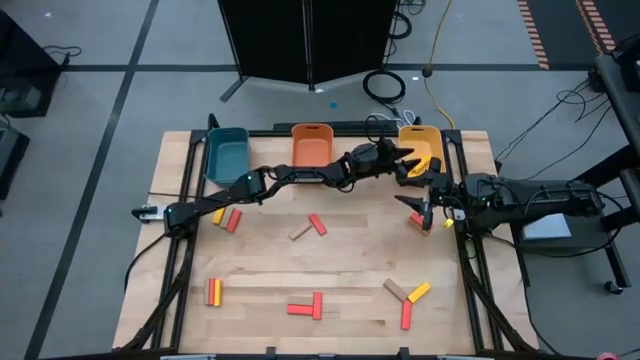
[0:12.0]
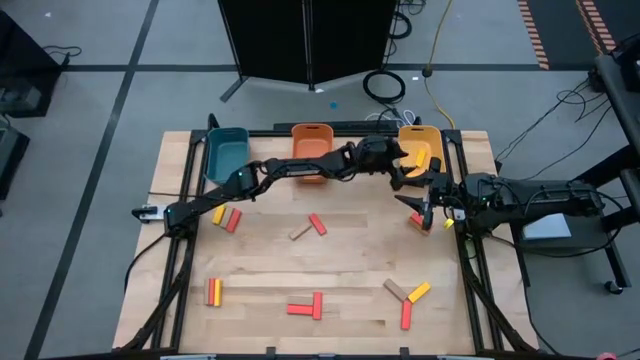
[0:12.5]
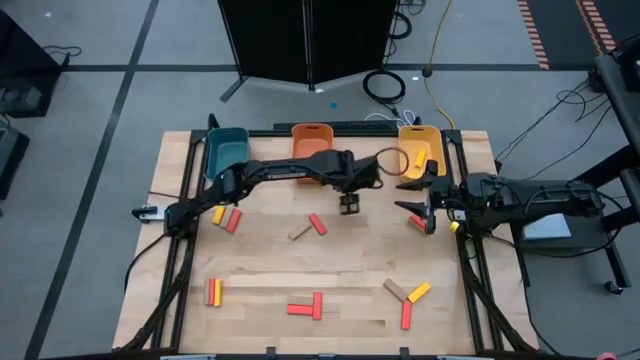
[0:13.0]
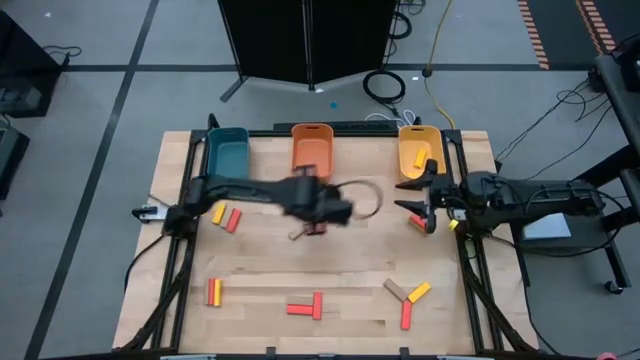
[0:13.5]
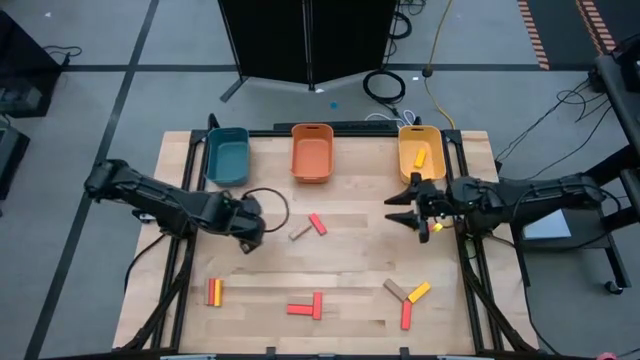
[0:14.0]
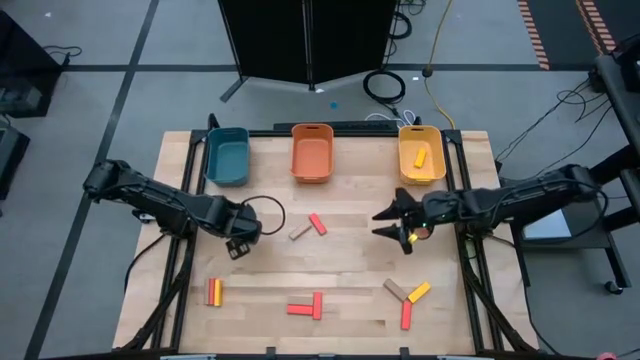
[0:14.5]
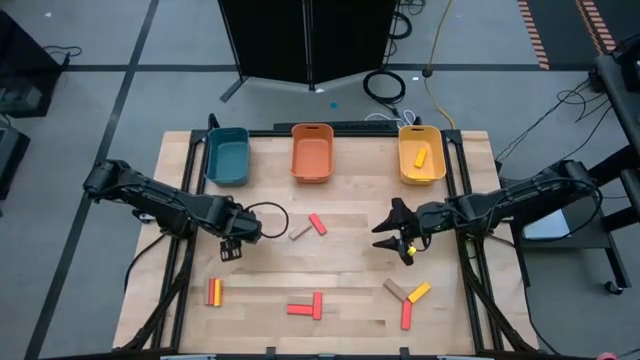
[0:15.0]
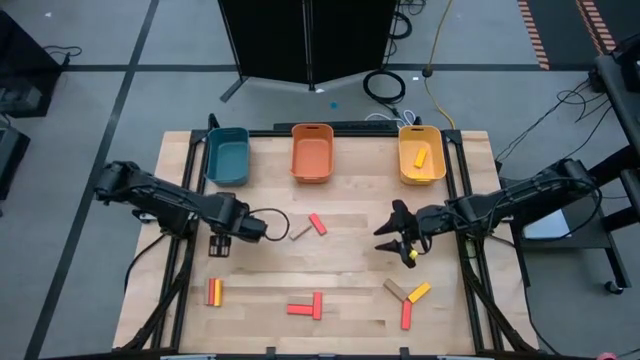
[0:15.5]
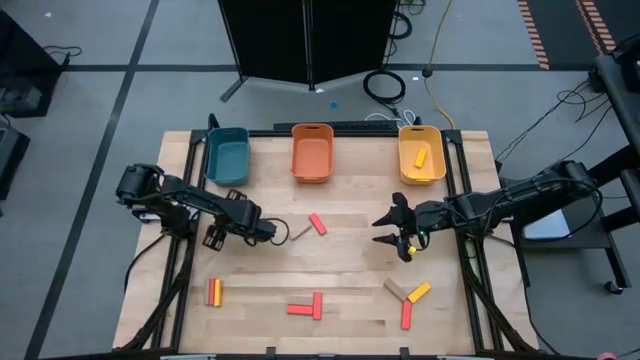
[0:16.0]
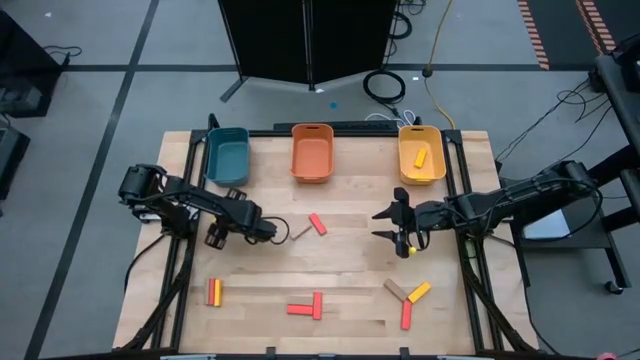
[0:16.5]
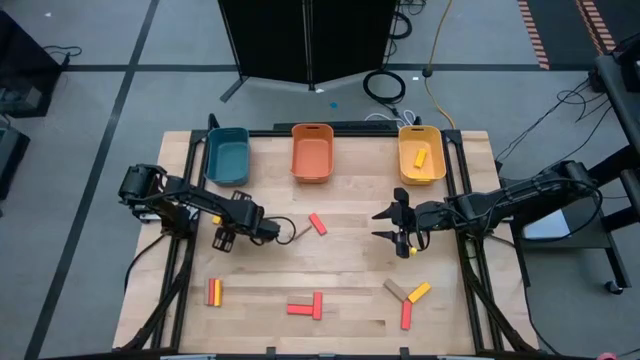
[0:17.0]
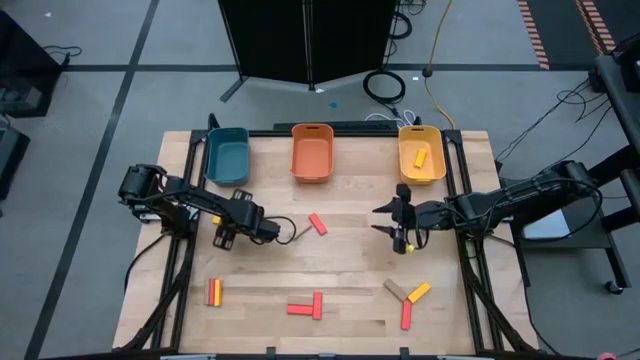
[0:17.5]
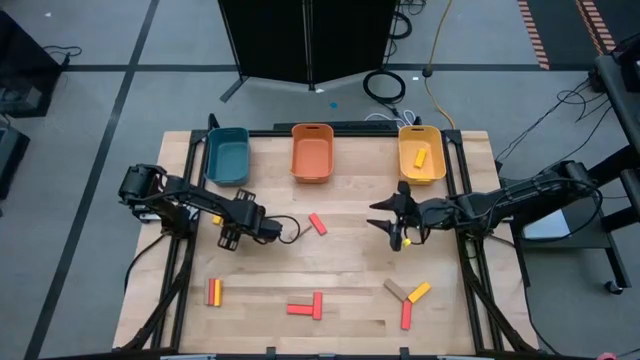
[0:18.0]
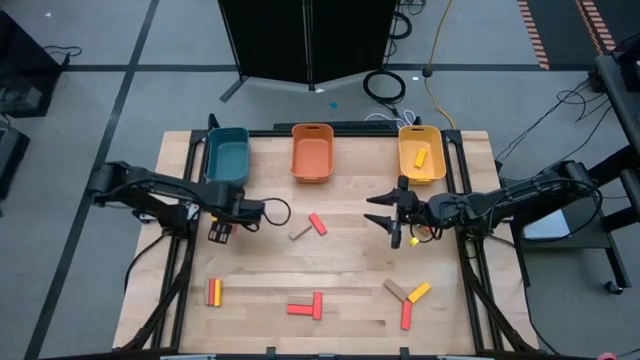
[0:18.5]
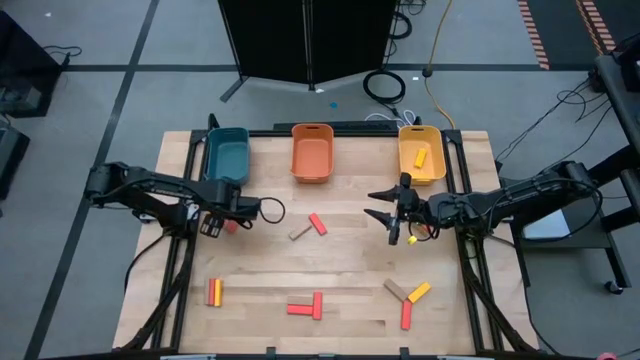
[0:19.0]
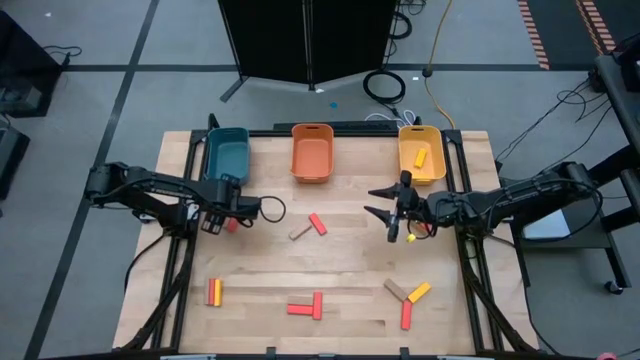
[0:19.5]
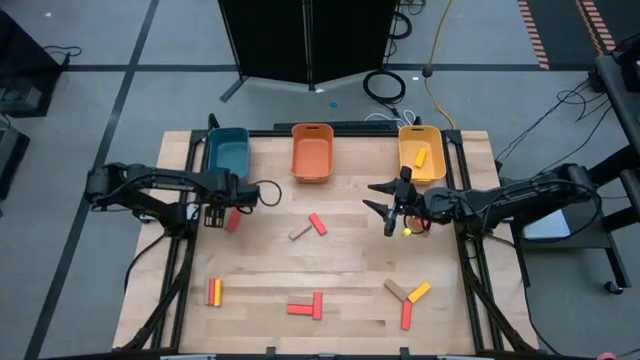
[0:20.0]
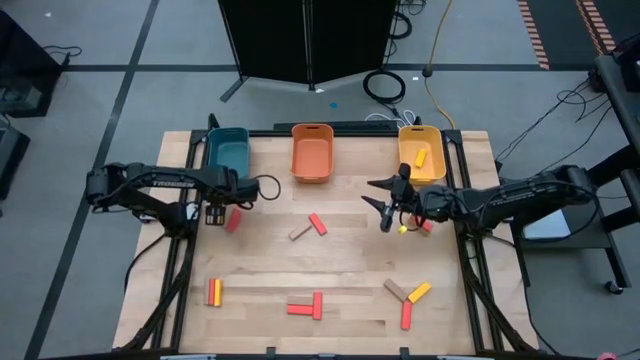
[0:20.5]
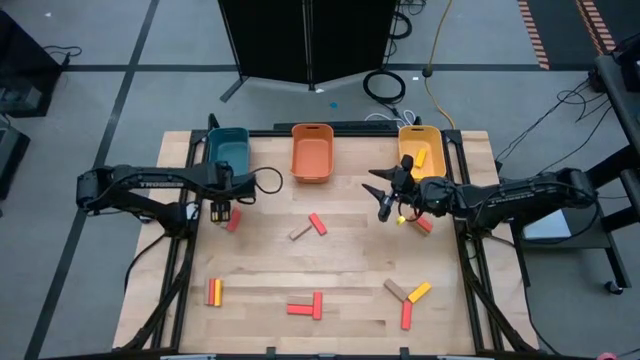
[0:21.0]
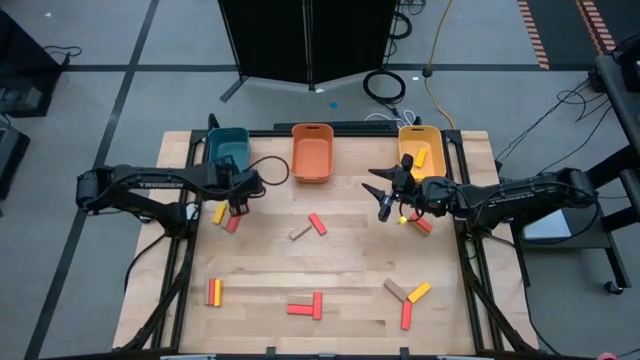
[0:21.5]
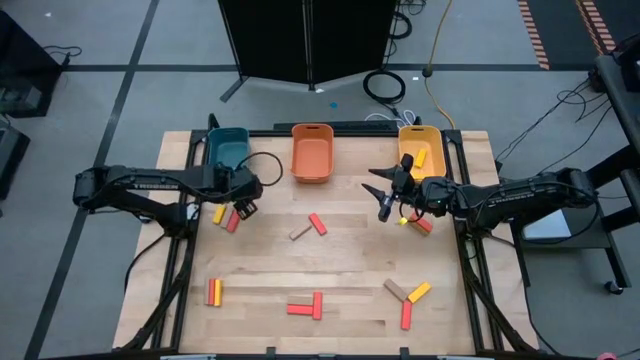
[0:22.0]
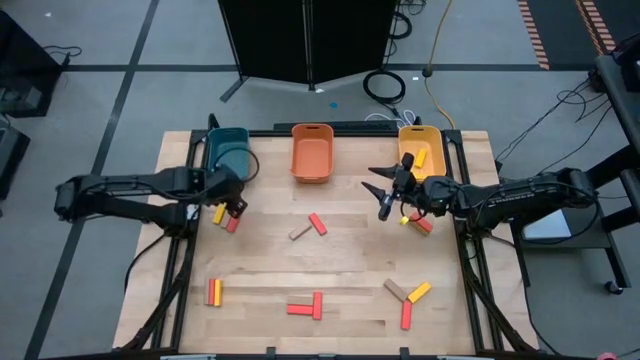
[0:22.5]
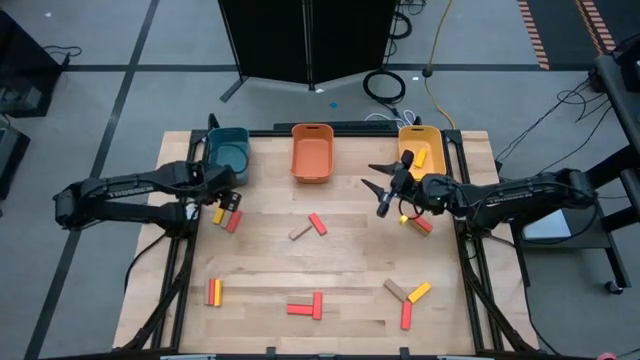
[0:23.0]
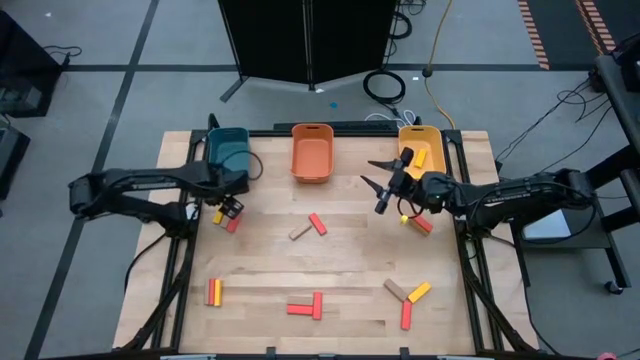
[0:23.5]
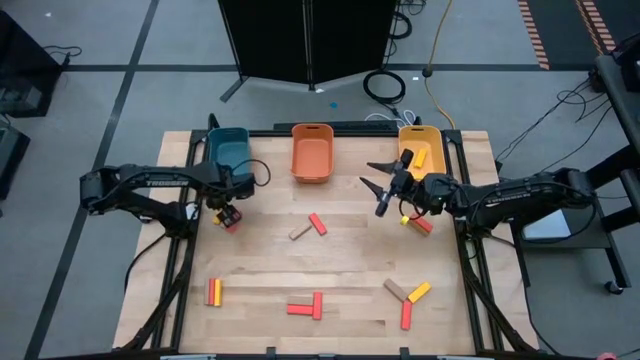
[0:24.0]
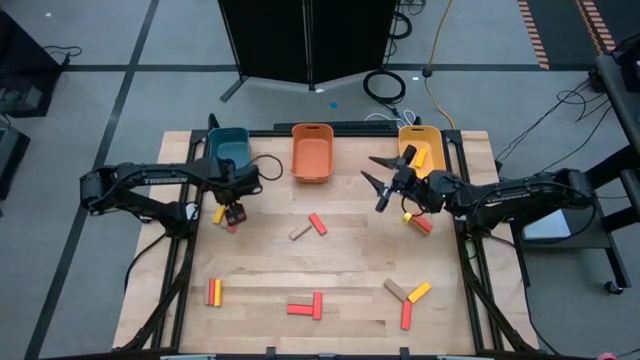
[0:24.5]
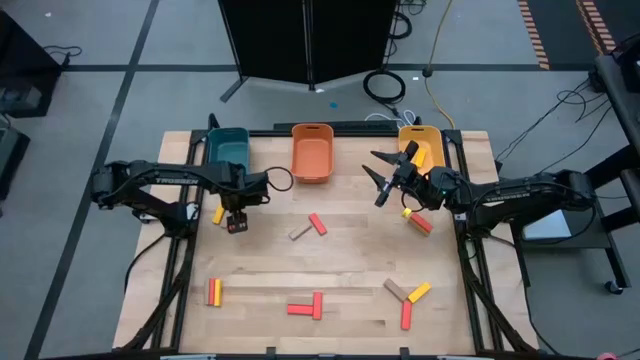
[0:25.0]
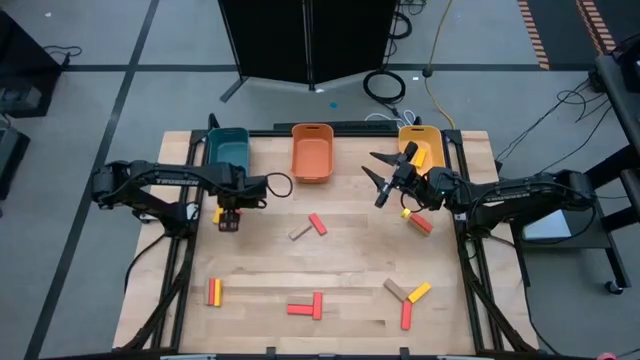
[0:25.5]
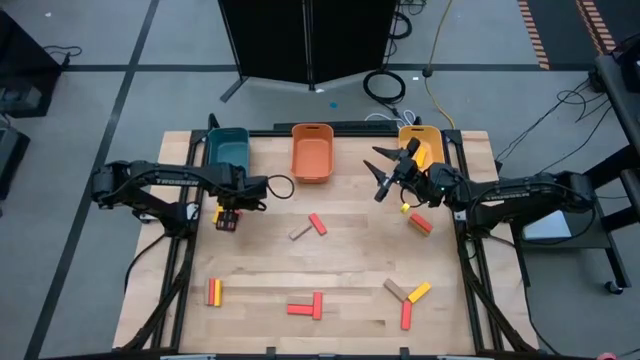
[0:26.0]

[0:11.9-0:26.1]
Task: Sort blocks
Put the yellow block into the yellow bin

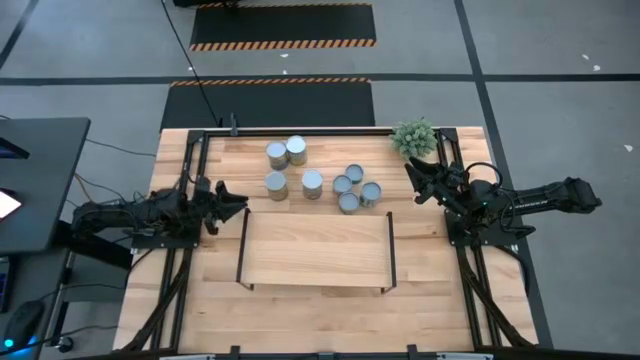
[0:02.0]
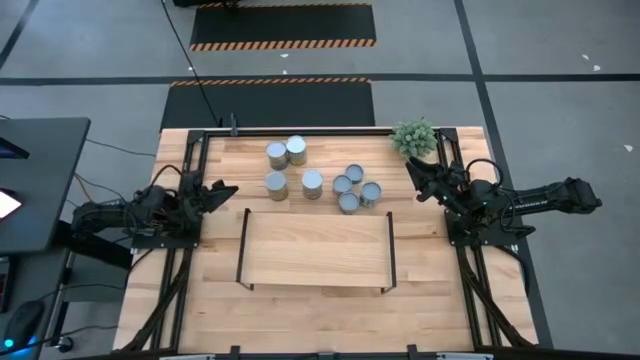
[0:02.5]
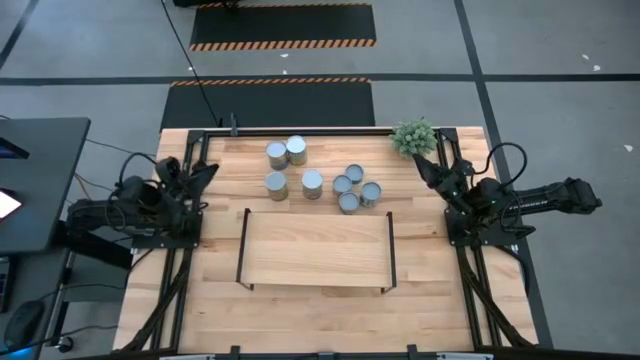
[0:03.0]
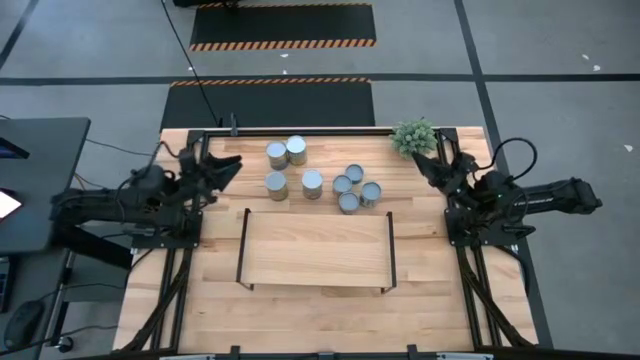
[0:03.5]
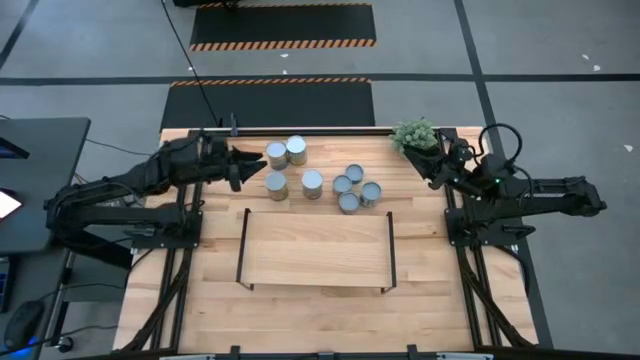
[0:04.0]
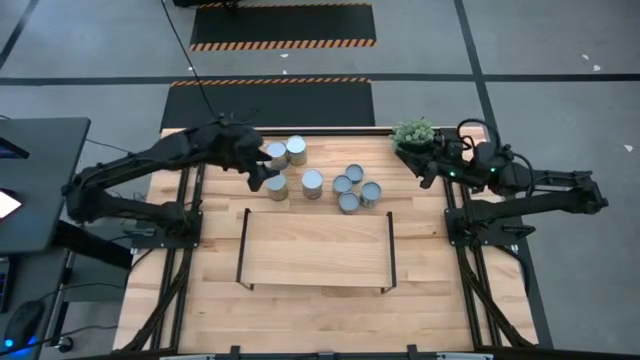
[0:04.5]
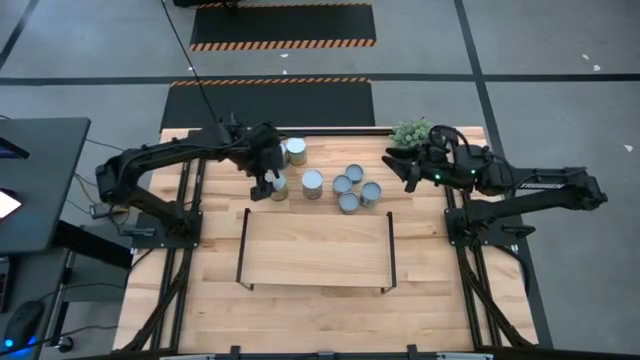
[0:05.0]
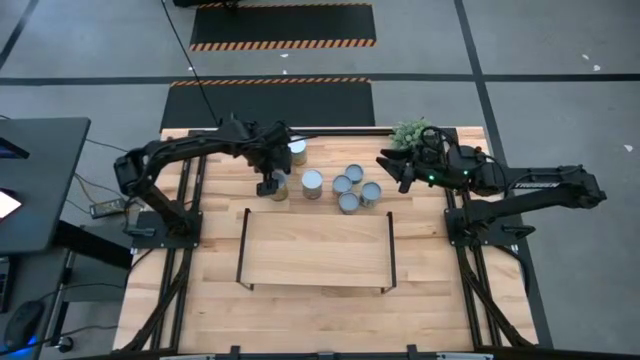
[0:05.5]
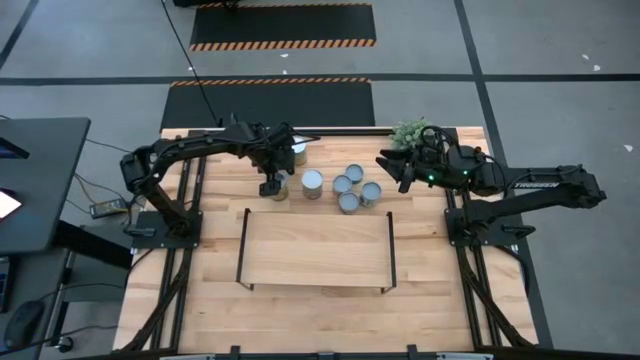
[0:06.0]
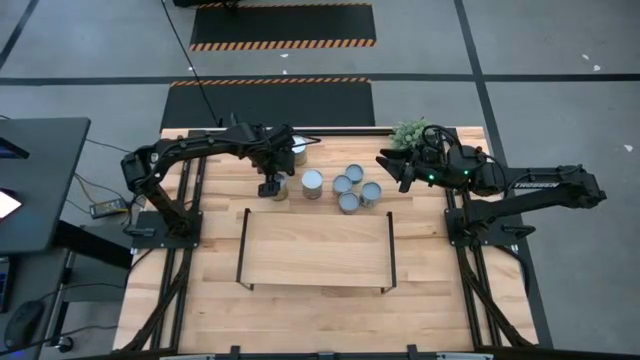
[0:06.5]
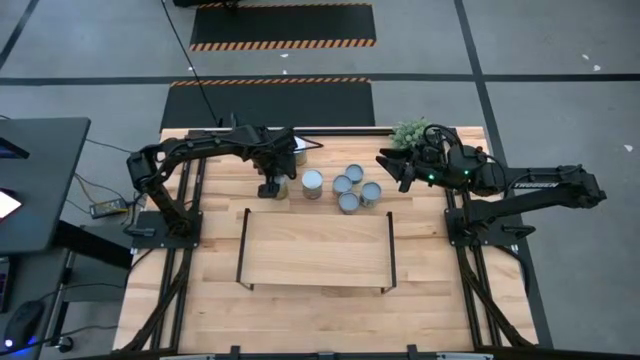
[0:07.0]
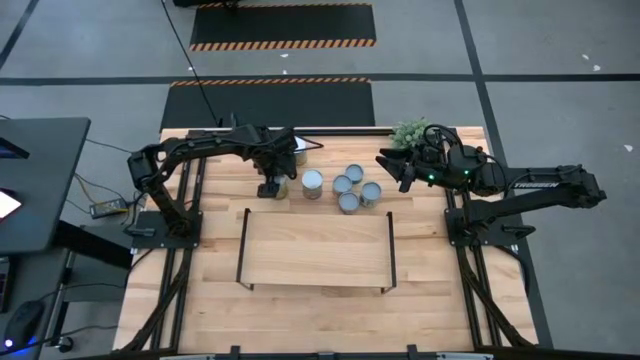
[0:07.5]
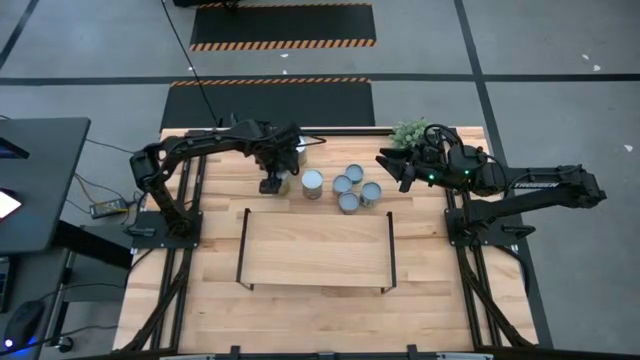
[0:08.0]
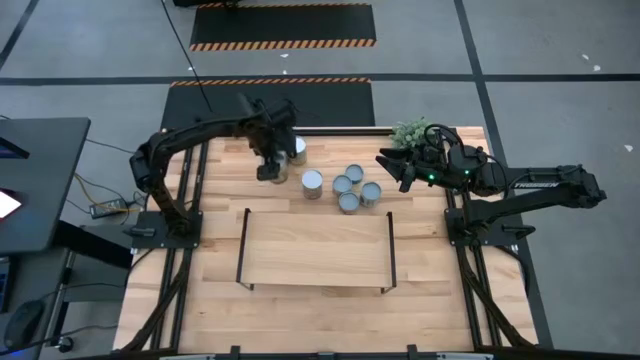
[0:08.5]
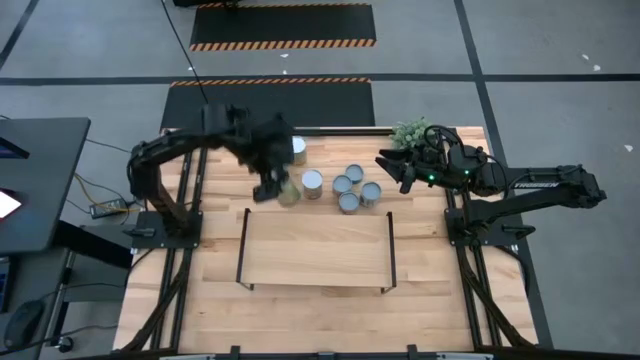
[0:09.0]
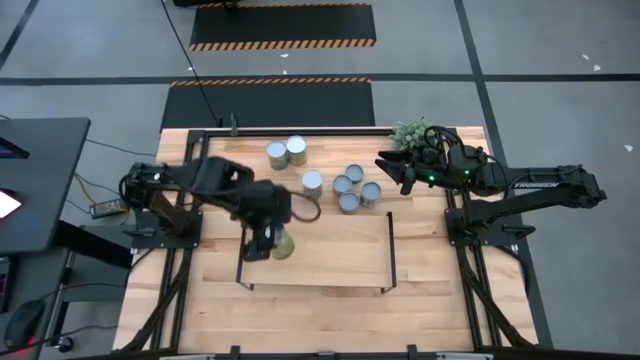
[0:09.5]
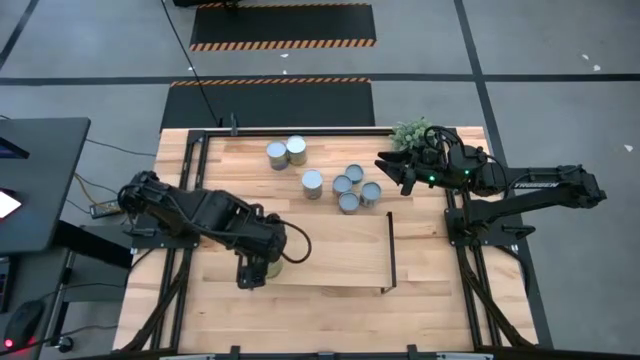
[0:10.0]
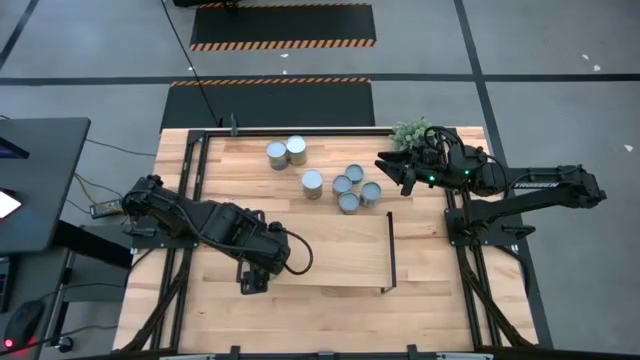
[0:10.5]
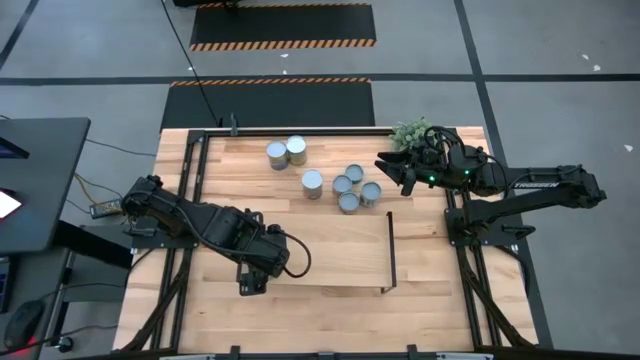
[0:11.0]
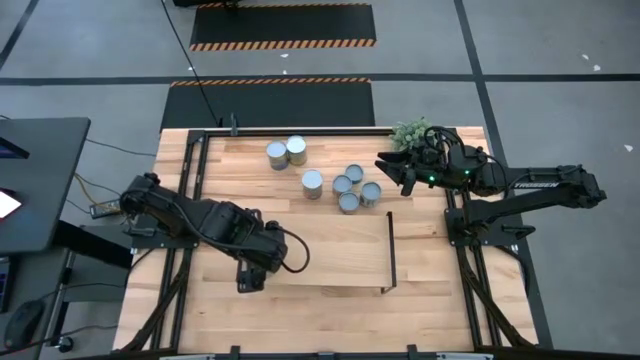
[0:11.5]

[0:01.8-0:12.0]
Task: Pick and place cans onto a shelf
Put the canned oranges on the shelf
